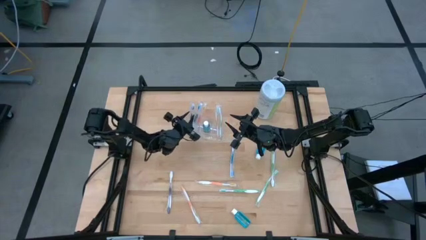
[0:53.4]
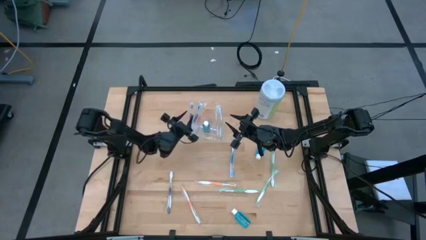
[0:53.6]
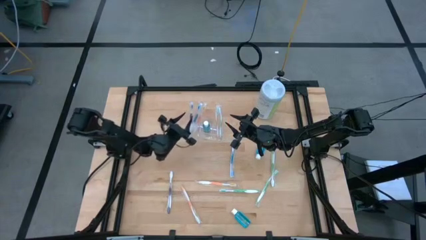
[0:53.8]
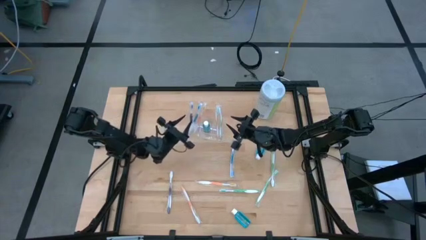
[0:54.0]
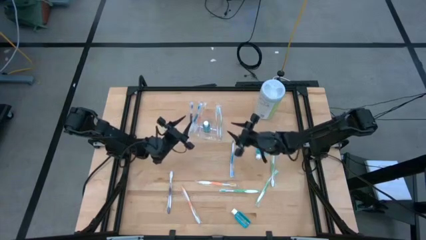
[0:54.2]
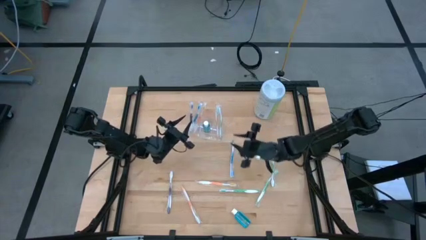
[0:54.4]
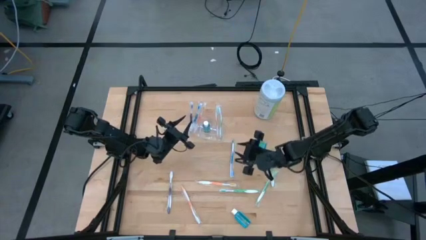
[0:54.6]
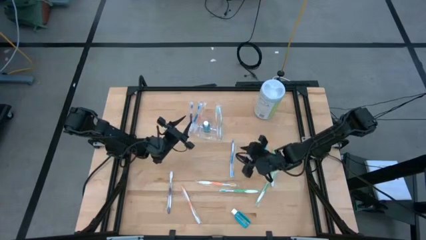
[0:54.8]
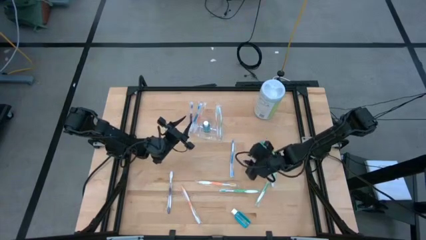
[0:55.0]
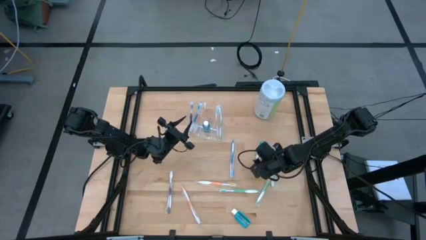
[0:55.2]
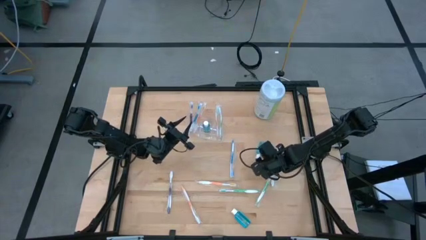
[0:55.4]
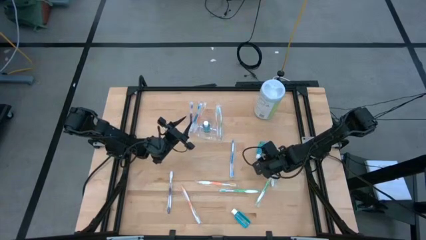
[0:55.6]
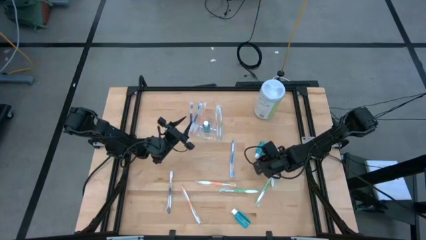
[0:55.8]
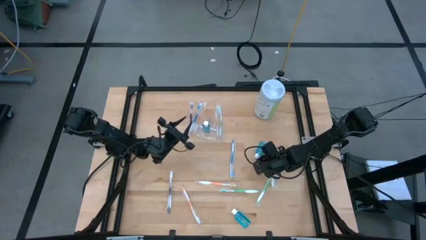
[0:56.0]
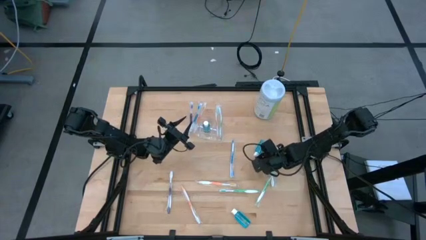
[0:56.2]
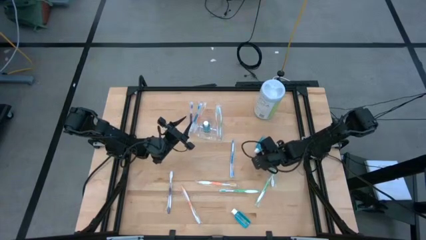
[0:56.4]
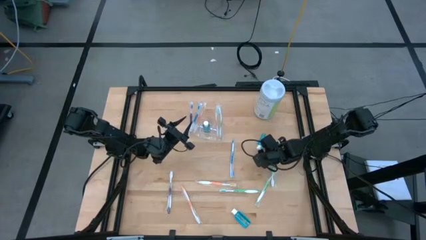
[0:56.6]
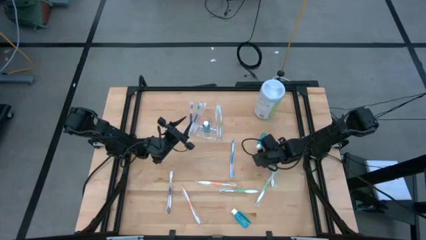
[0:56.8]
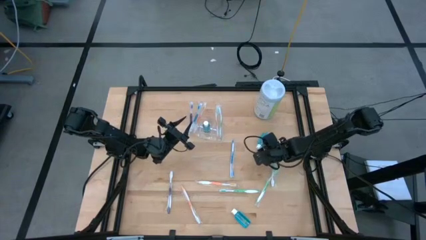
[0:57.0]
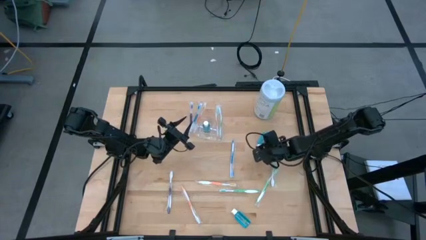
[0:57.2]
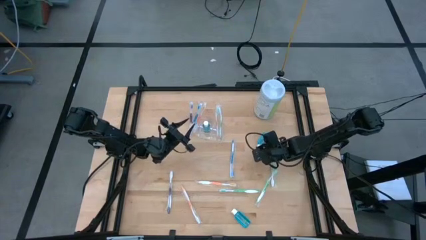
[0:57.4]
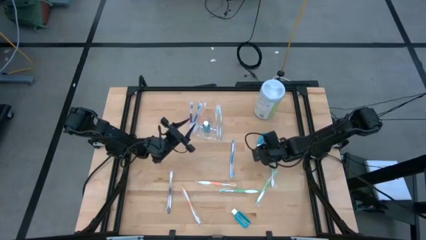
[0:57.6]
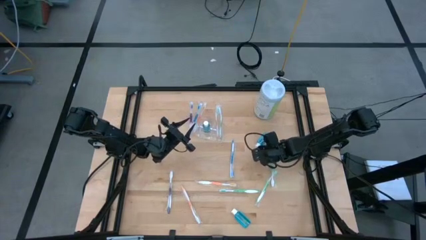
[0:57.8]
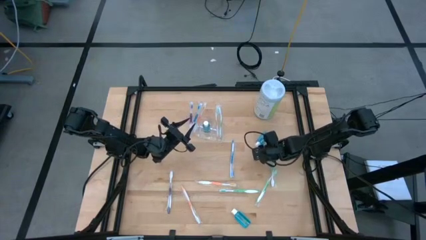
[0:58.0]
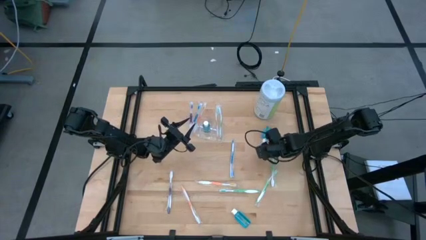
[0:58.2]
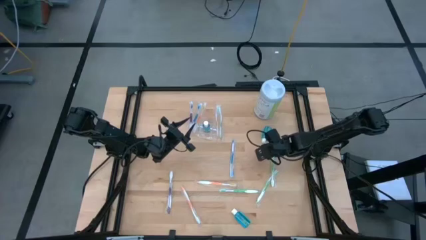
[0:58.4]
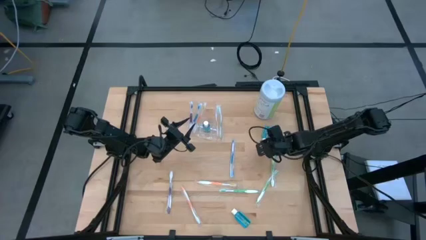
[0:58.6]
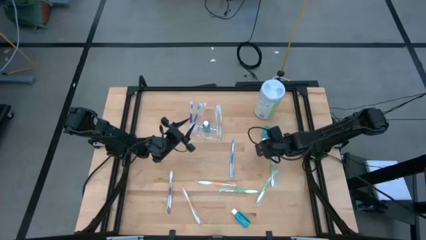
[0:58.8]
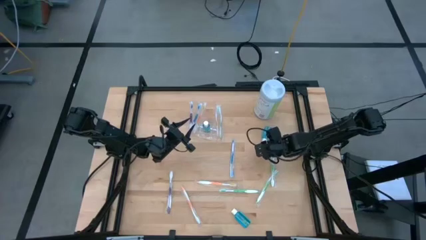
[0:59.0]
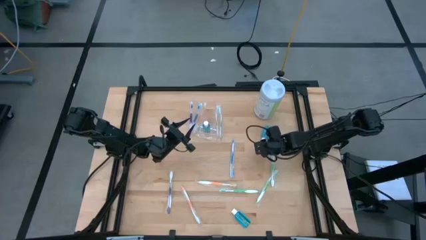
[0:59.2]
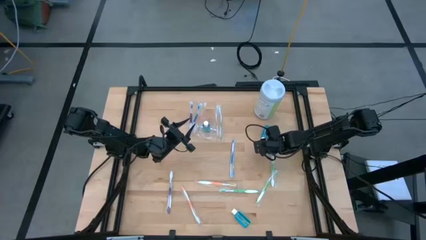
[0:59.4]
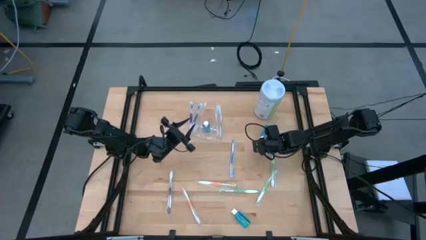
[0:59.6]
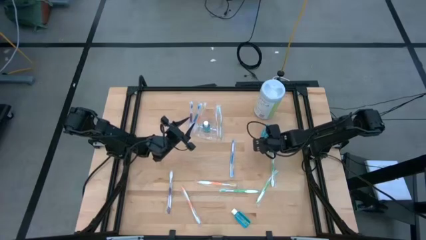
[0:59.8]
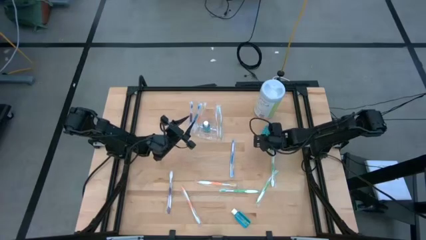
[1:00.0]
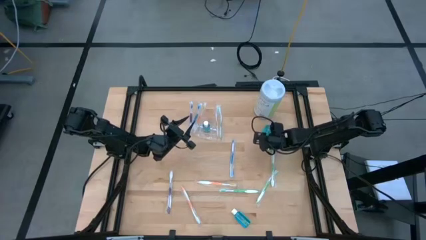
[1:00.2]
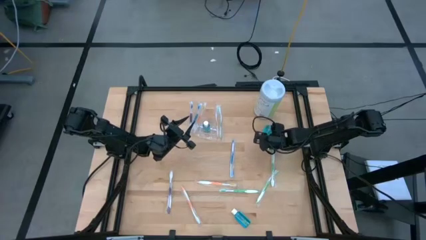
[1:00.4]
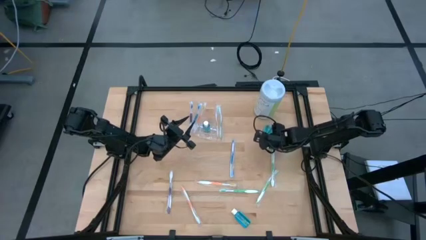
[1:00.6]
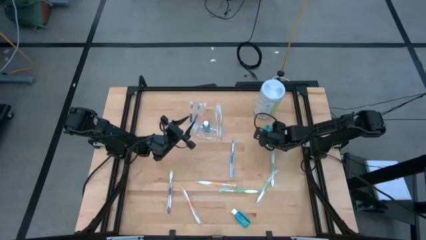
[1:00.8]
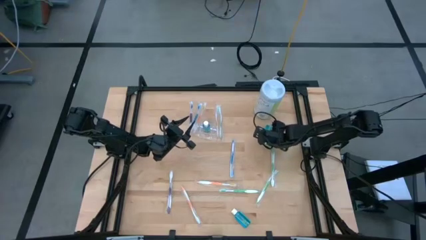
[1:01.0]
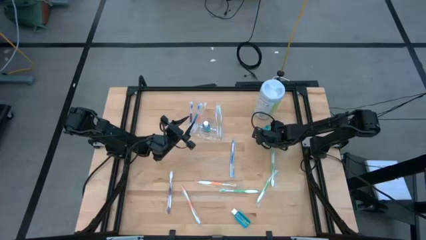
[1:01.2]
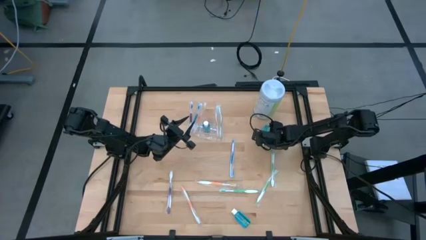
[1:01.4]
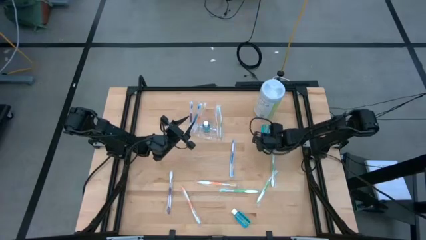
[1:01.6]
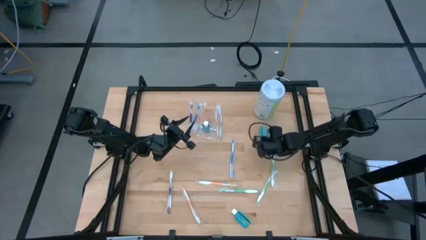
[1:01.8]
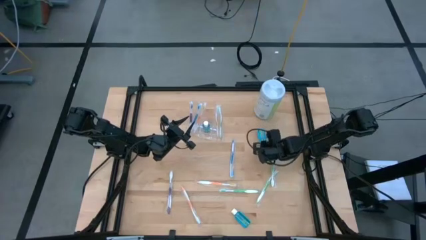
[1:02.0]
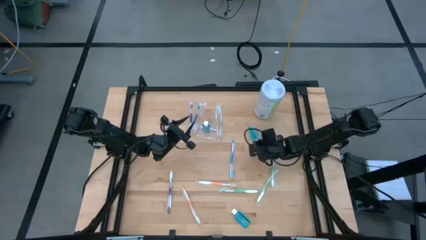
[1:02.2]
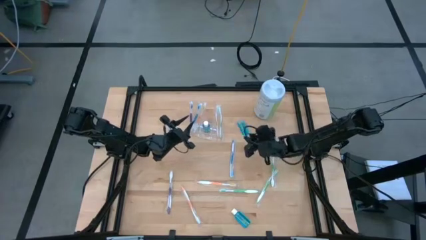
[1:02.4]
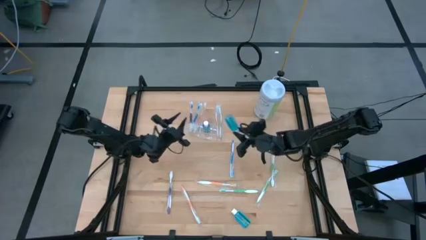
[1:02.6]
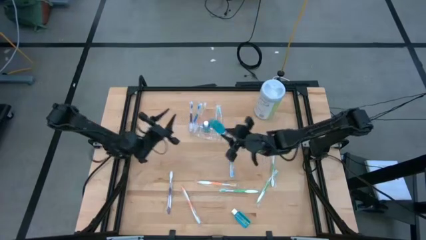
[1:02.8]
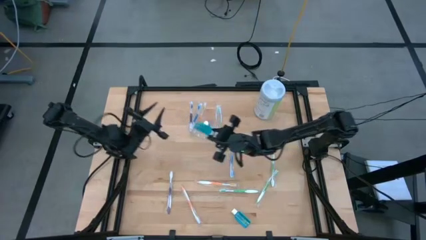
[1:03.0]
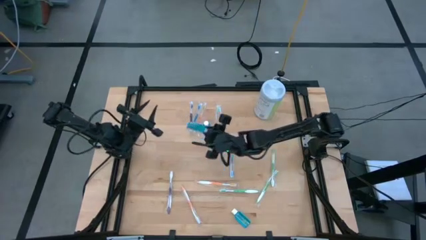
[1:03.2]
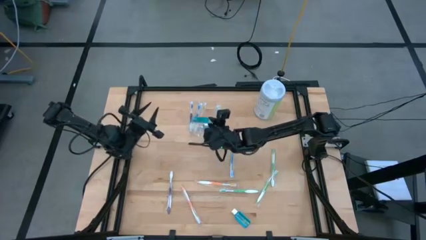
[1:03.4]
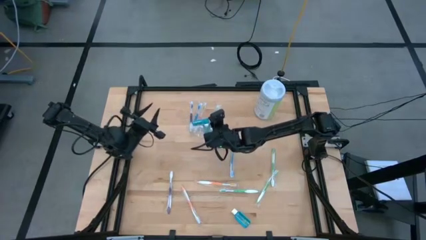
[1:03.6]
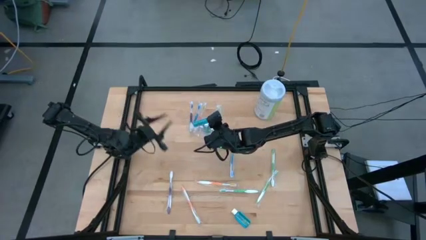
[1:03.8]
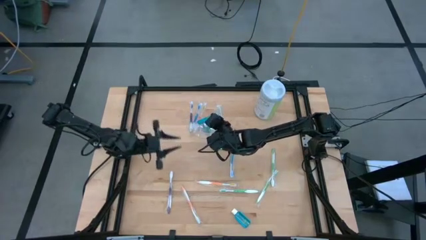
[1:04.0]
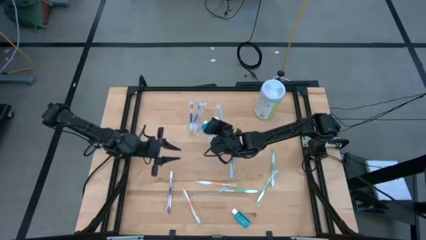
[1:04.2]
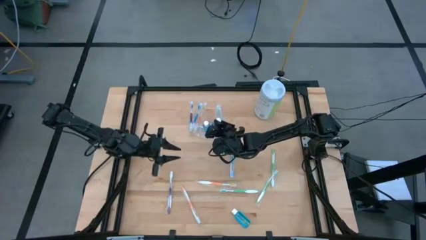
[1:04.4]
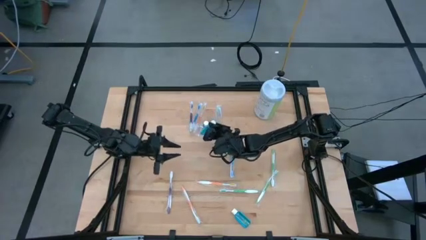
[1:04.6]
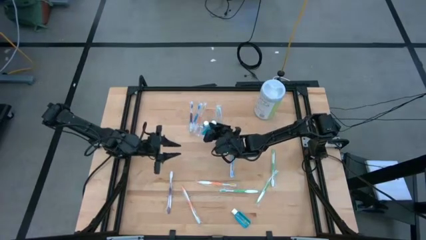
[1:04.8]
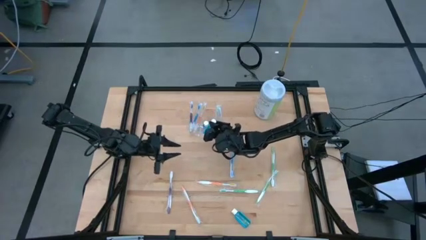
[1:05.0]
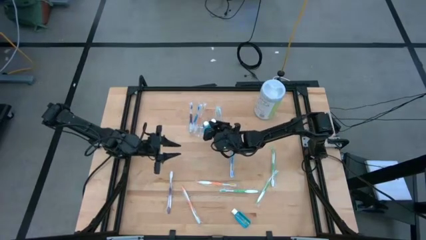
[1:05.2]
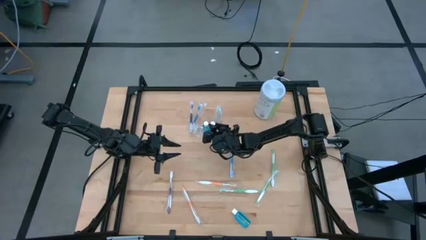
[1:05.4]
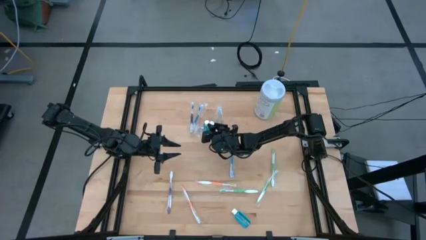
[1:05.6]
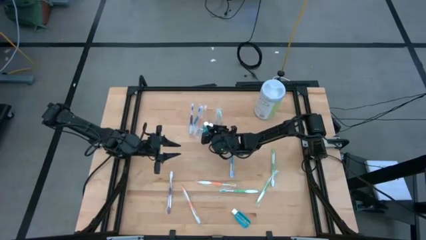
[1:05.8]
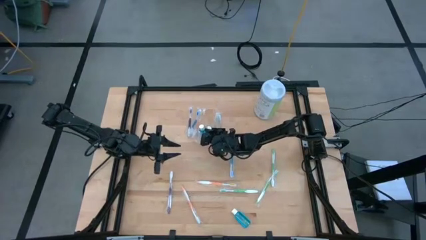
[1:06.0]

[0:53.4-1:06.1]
Task: Pick & Place toothbrushing station
Put the top mouthwash into the transparent organizer

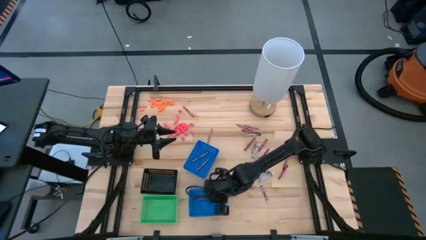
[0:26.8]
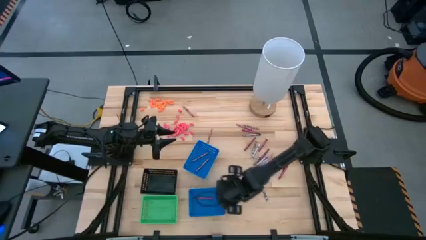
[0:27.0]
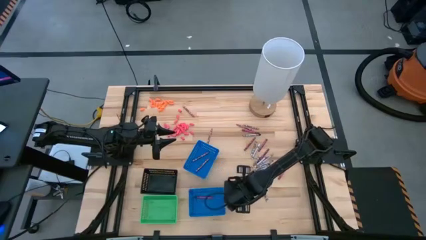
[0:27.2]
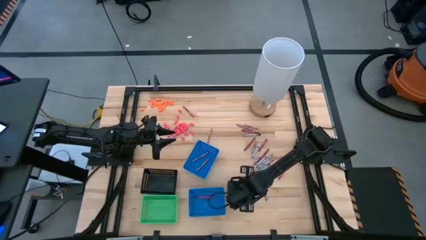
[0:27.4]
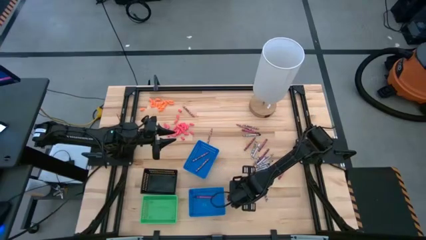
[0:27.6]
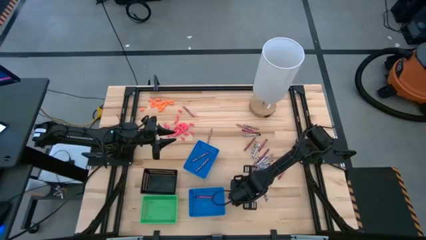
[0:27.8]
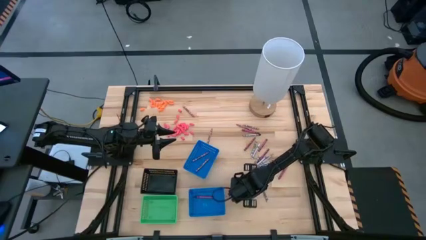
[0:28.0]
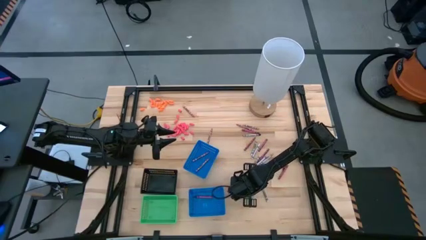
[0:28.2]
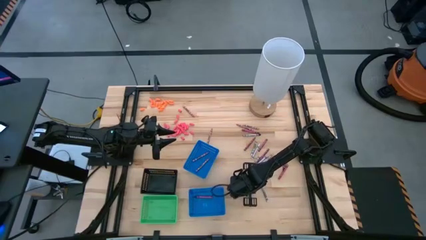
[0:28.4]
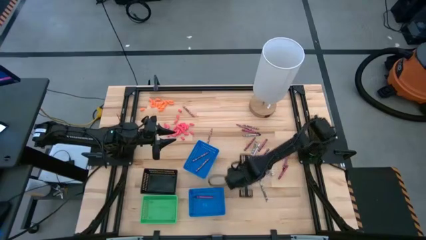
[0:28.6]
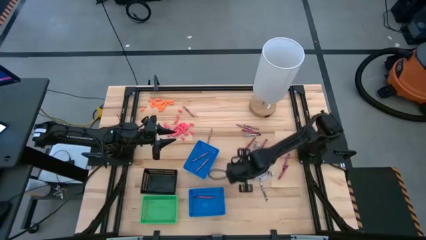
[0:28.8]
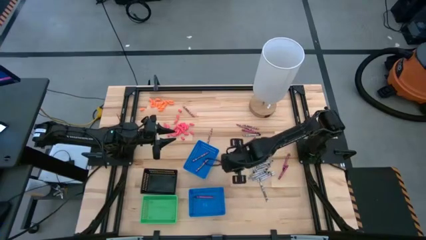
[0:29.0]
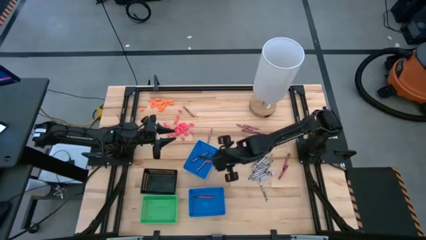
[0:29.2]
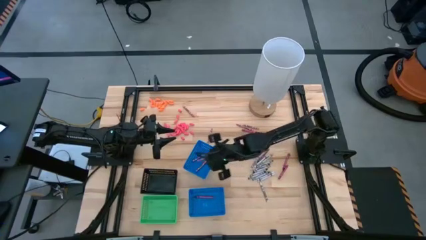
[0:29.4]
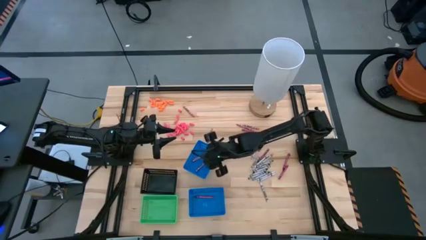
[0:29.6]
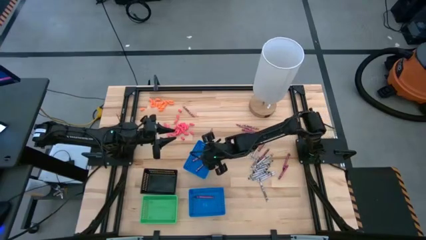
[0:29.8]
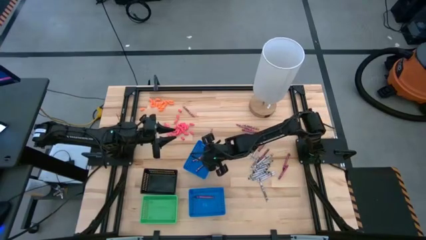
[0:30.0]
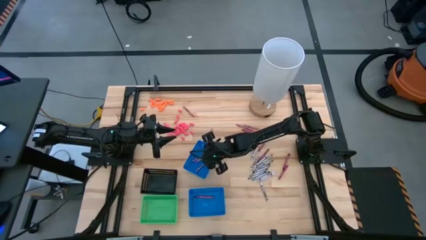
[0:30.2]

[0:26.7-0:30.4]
Task: Sort crayons
Put the pink crayon into the top blue bin
